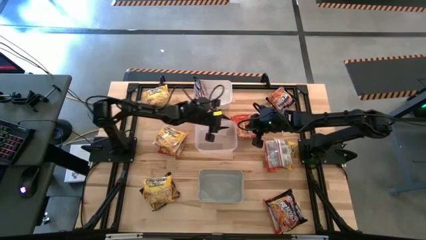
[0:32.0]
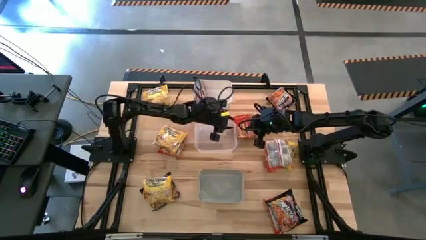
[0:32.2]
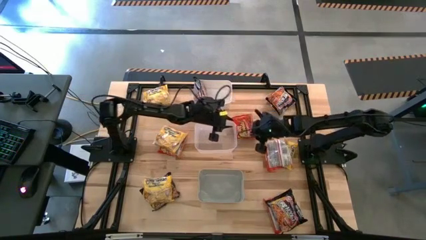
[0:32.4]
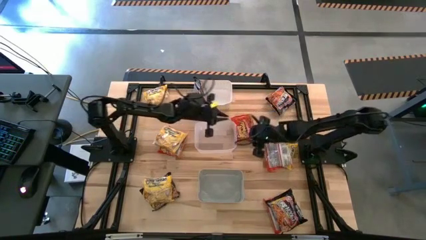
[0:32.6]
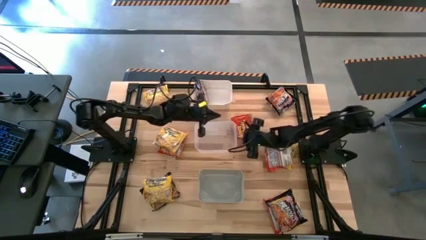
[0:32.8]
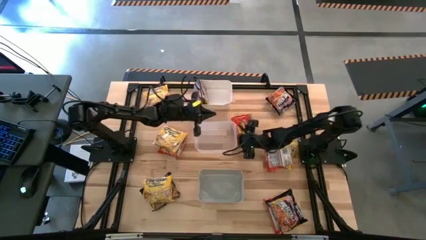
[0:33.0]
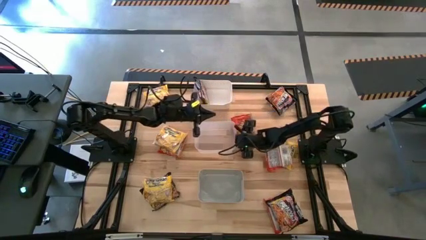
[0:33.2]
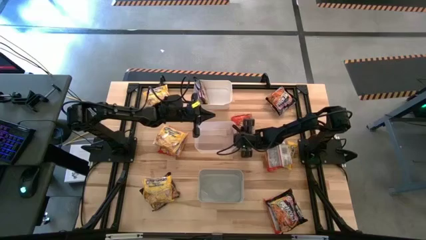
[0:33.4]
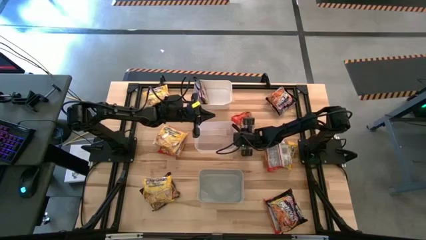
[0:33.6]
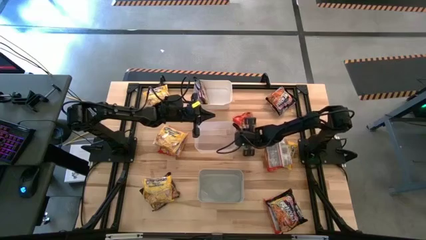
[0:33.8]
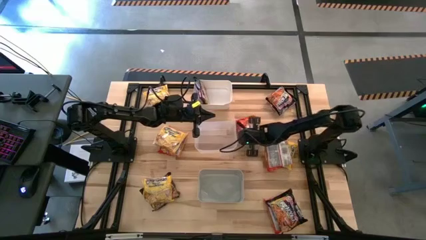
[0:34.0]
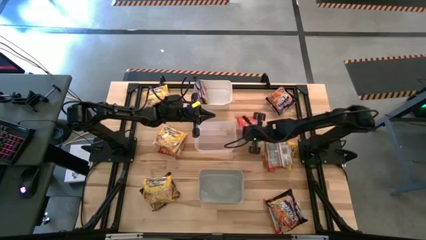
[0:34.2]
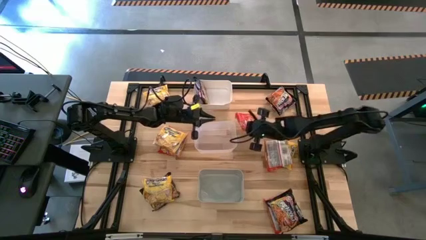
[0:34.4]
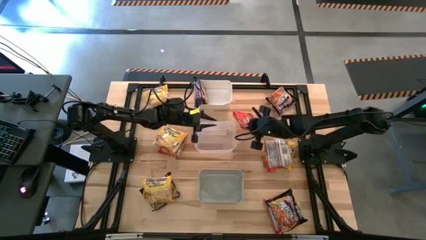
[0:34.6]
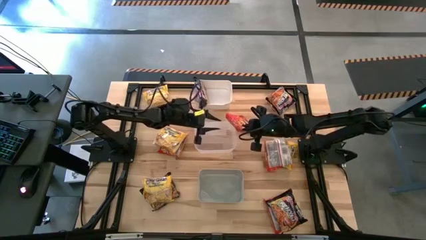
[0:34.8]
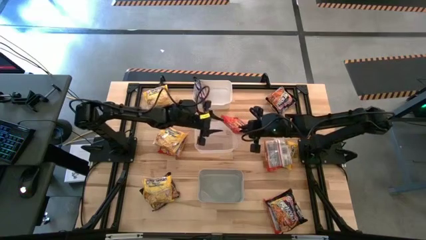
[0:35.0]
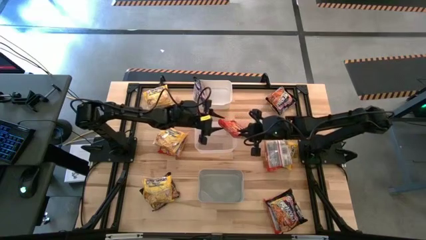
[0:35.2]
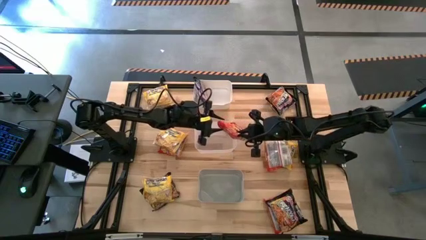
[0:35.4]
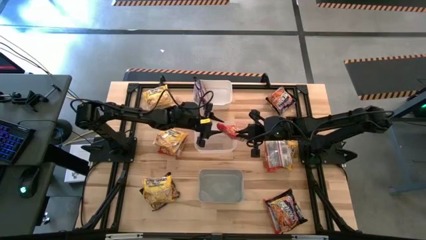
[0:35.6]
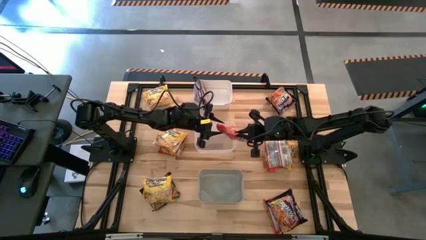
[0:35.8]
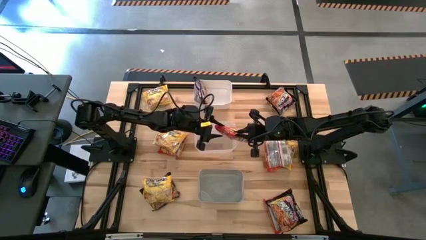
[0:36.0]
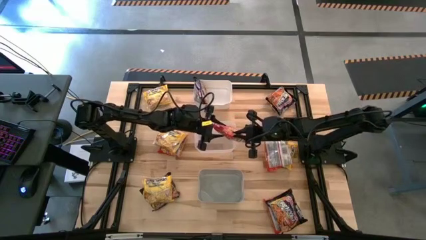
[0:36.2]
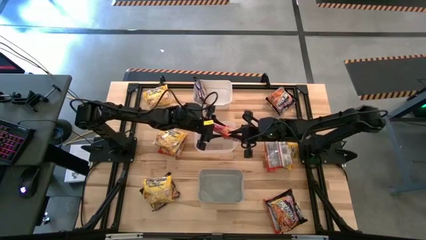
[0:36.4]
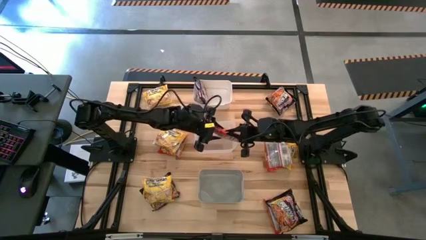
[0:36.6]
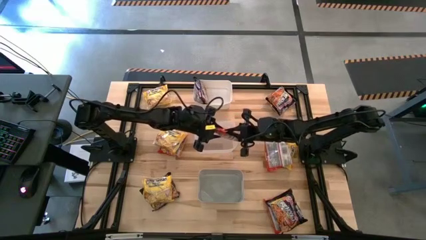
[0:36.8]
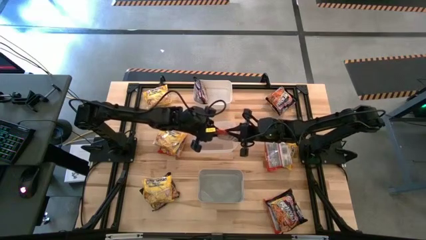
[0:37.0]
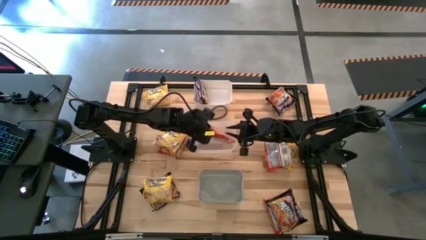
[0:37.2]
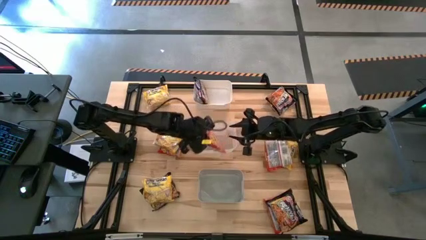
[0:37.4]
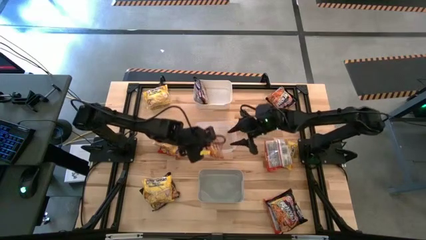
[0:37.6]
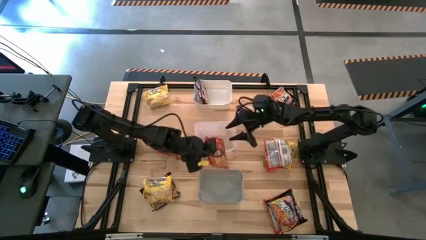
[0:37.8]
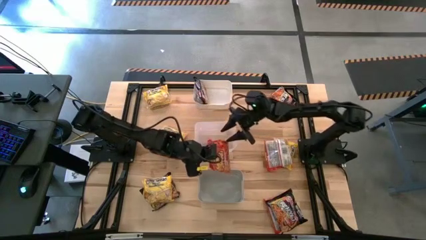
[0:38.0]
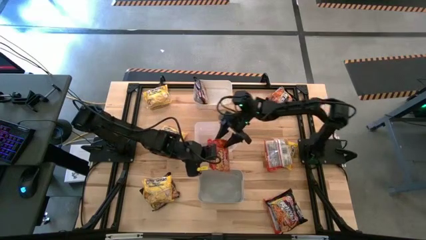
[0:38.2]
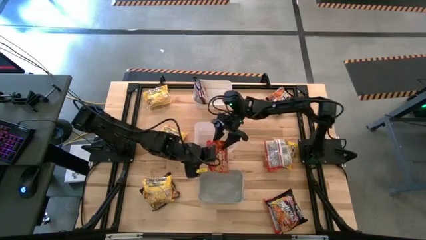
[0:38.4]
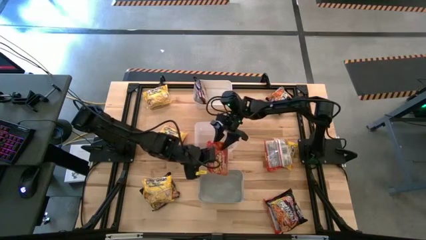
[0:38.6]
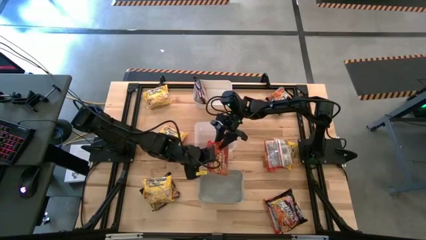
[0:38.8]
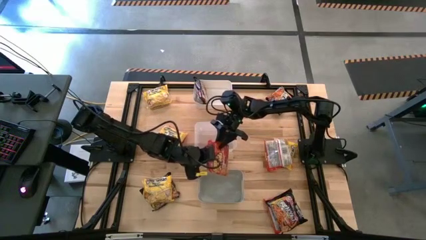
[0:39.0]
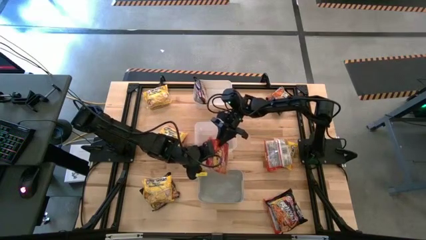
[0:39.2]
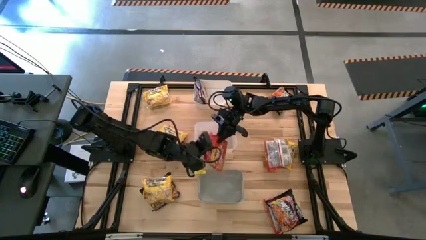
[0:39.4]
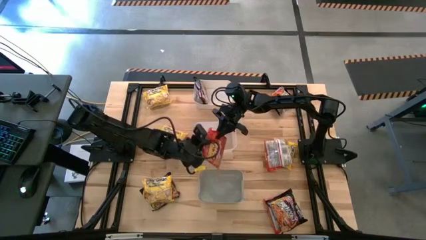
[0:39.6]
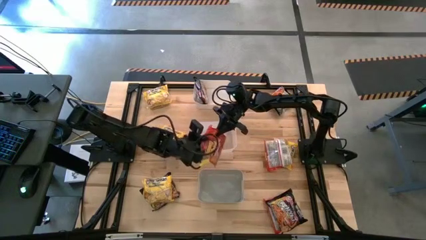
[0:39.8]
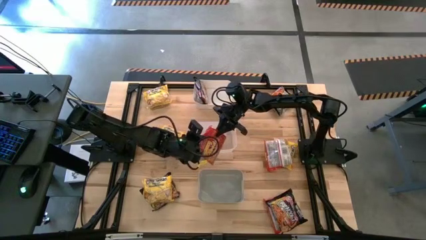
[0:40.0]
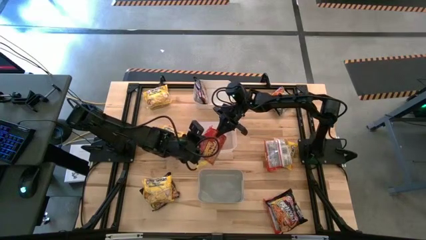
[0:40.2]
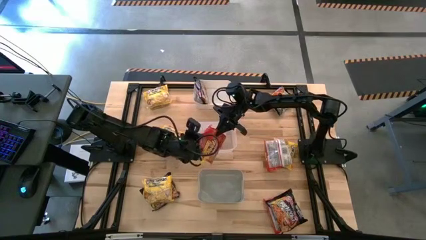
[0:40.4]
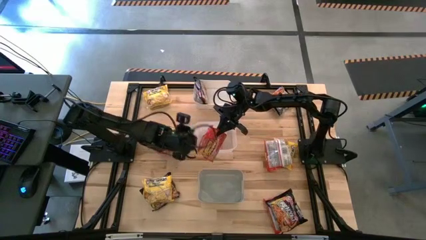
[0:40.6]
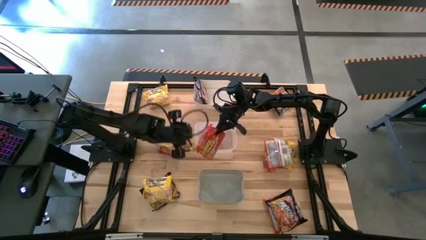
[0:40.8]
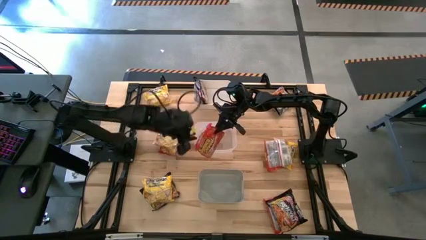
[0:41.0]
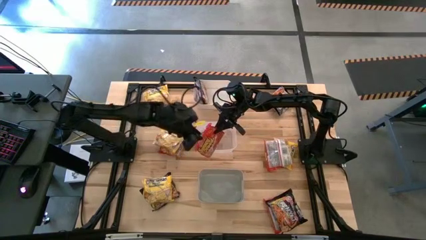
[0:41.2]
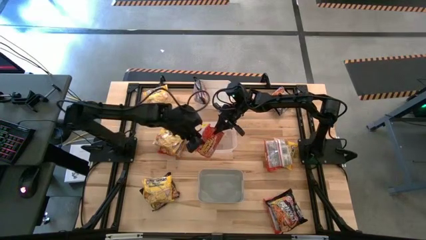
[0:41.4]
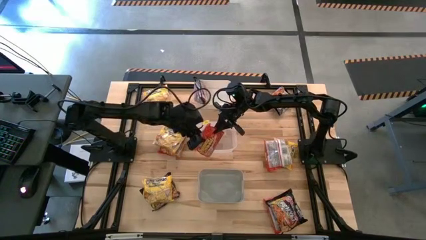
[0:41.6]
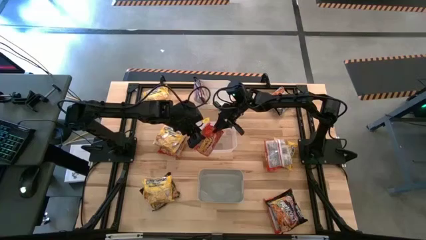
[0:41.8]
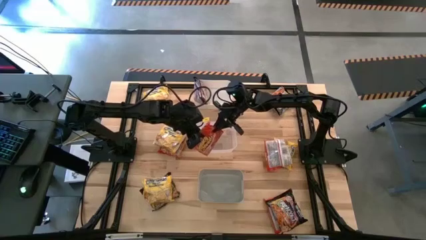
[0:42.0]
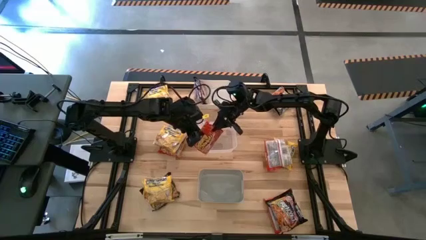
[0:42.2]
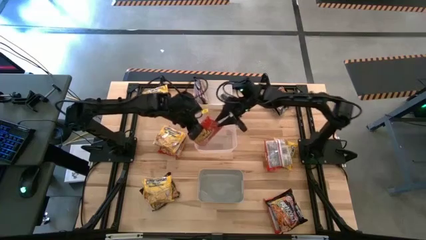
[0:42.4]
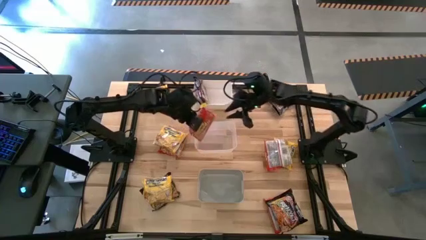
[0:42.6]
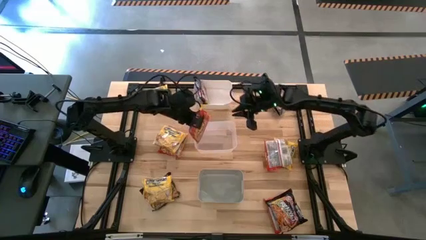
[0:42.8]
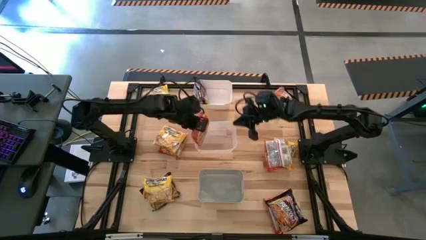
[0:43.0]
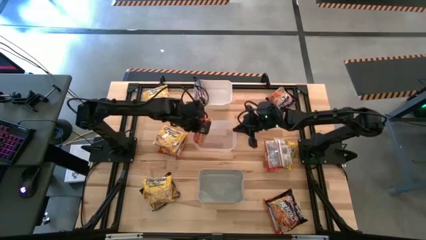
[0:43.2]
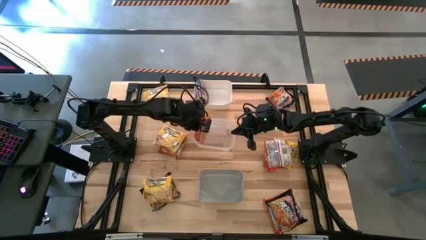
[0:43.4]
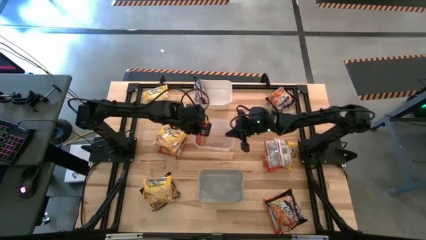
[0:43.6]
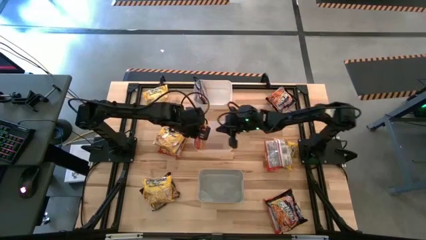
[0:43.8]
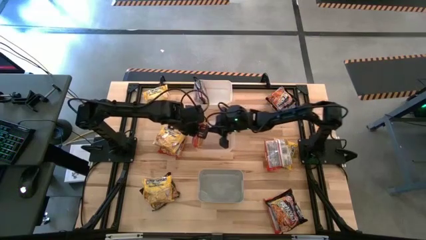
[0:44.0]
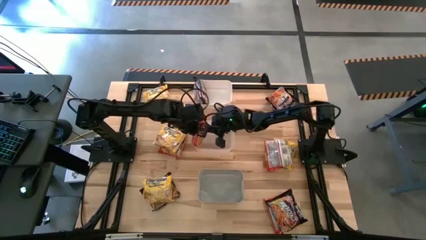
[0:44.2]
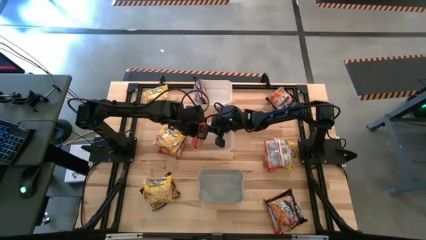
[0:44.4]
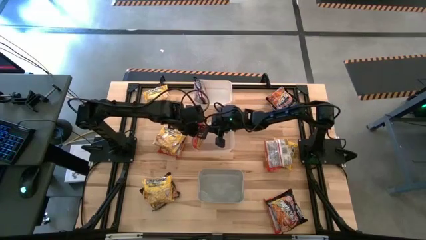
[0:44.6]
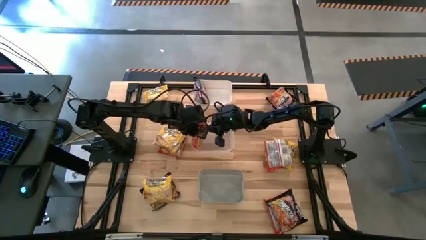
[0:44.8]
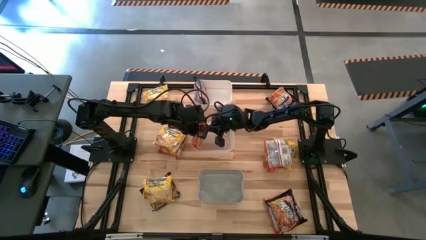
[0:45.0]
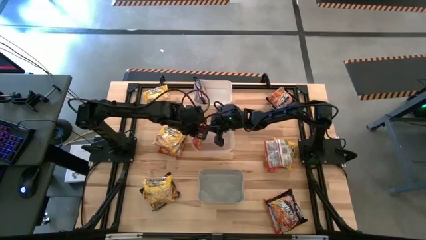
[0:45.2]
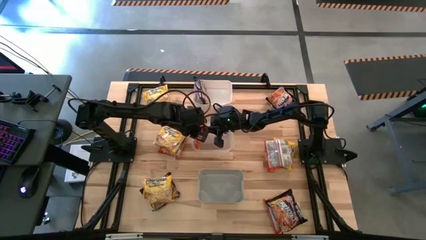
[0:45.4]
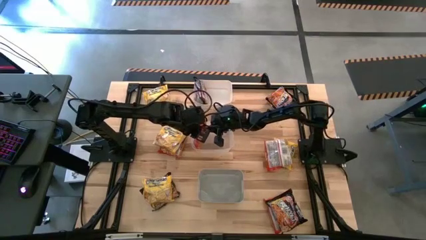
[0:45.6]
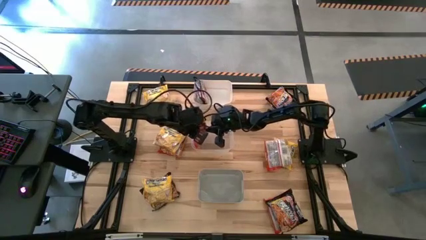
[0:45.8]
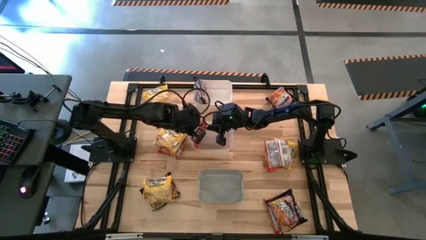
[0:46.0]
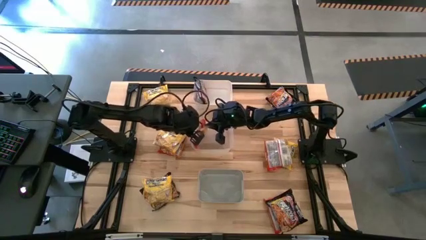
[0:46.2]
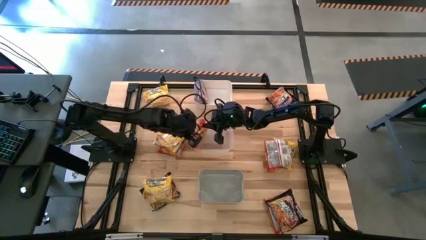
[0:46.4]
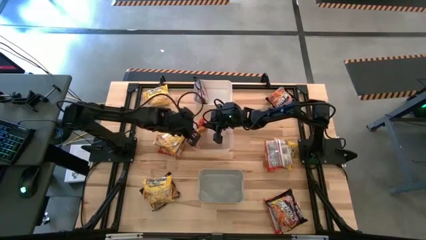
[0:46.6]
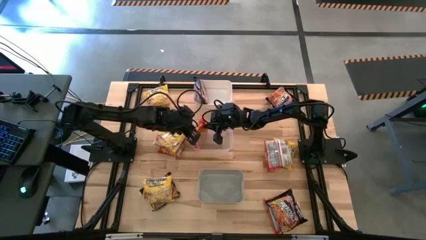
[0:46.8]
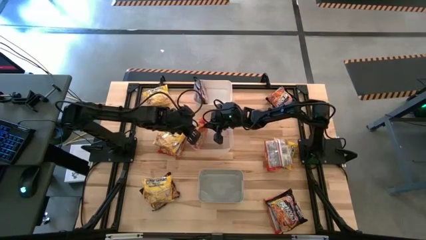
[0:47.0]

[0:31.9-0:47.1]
Task: Sort Maruchan noodles
Put the orange noodle pack into the transparent bin
